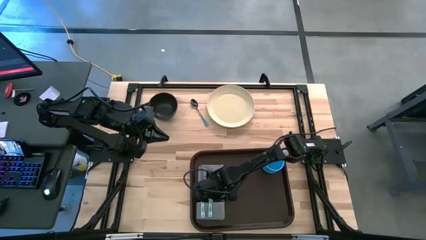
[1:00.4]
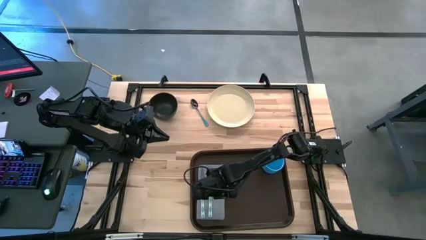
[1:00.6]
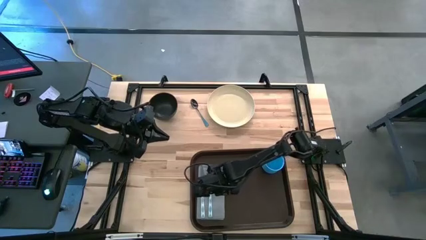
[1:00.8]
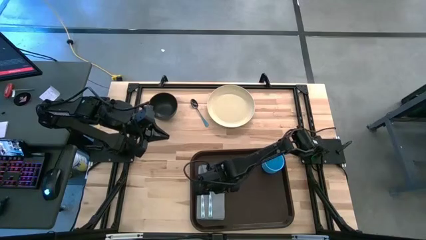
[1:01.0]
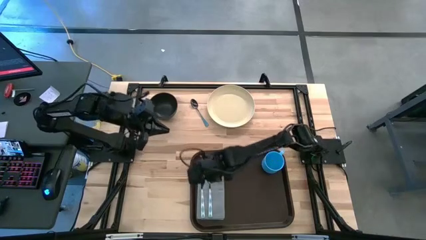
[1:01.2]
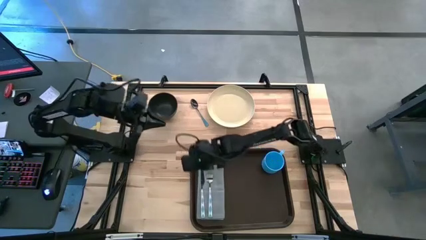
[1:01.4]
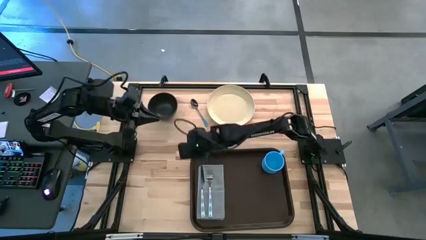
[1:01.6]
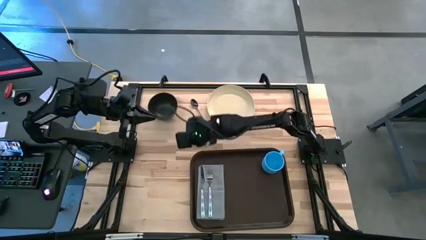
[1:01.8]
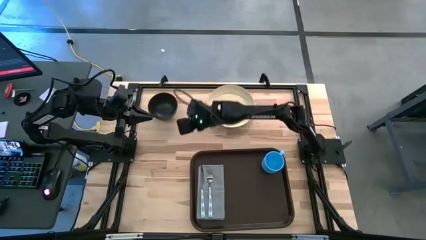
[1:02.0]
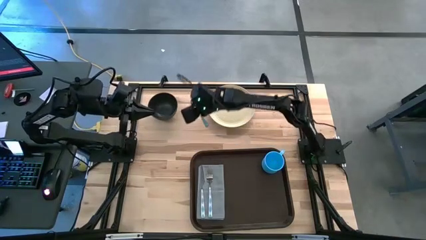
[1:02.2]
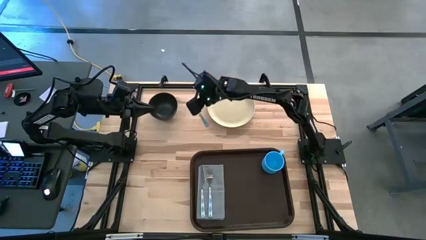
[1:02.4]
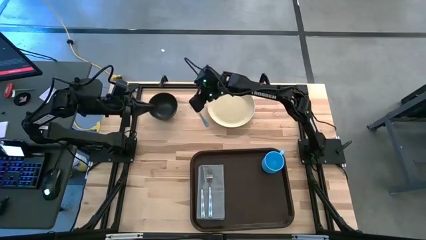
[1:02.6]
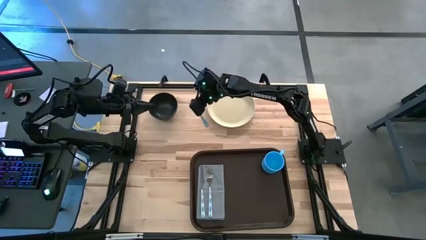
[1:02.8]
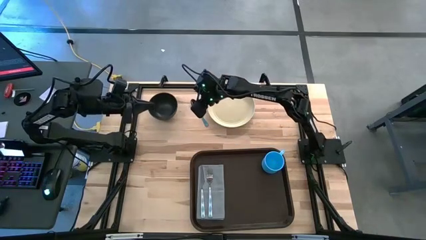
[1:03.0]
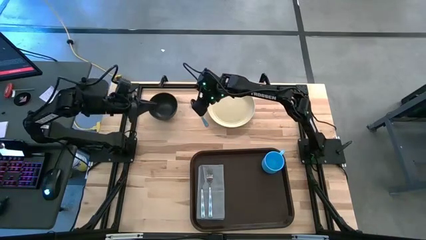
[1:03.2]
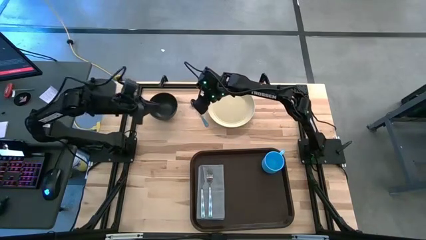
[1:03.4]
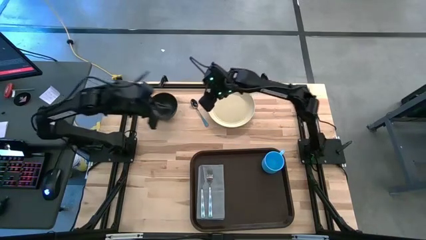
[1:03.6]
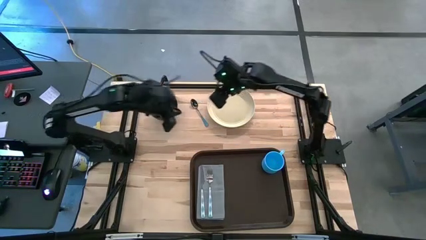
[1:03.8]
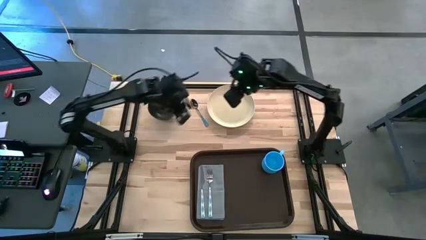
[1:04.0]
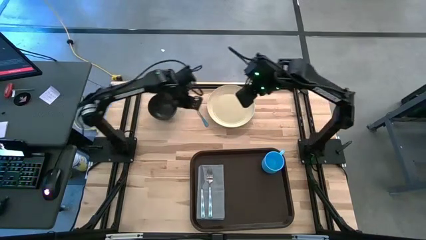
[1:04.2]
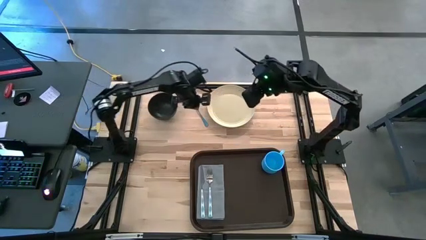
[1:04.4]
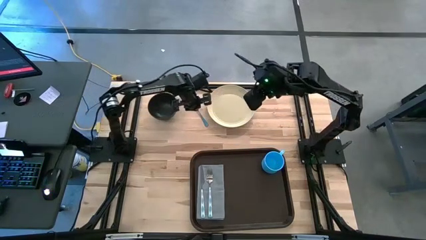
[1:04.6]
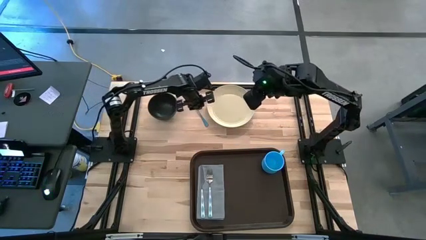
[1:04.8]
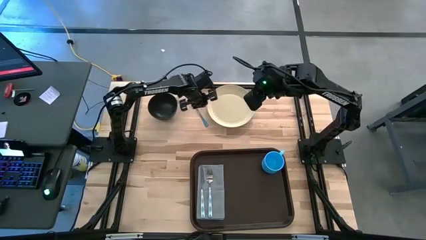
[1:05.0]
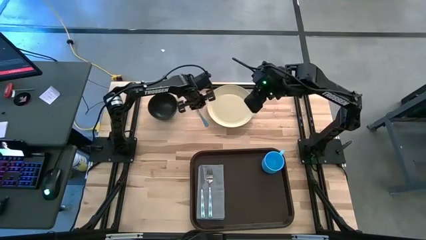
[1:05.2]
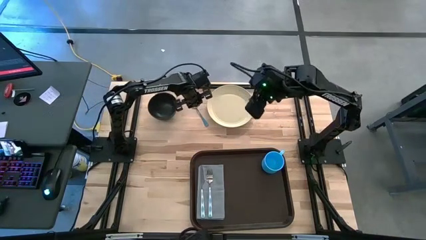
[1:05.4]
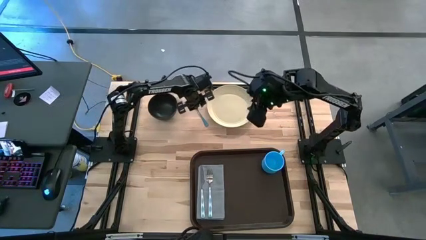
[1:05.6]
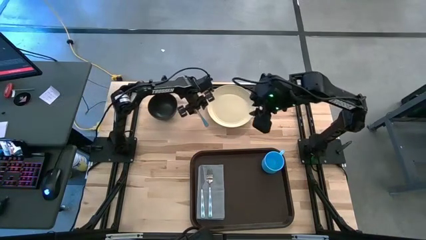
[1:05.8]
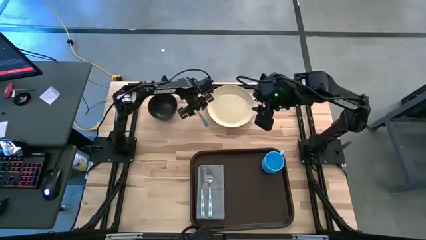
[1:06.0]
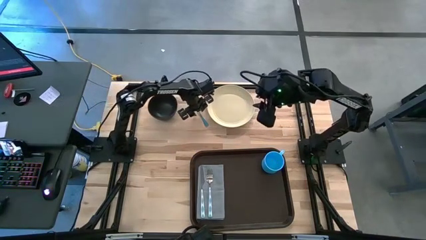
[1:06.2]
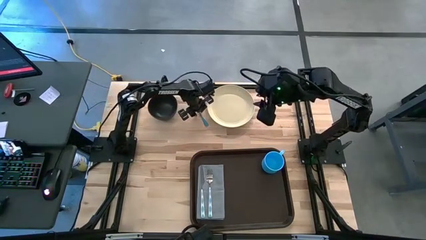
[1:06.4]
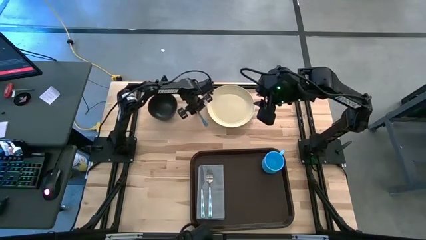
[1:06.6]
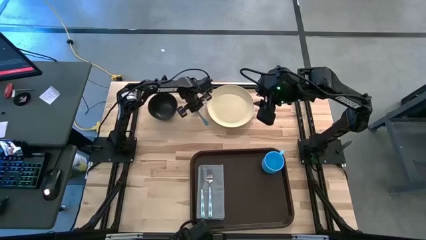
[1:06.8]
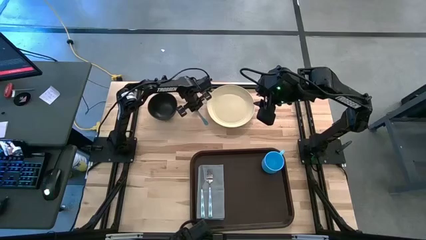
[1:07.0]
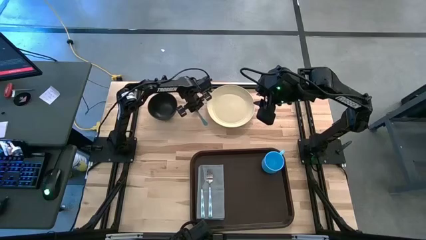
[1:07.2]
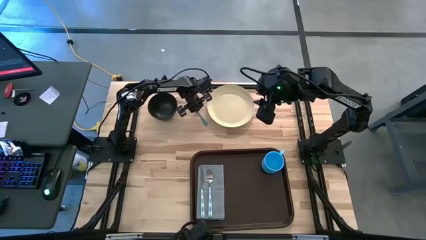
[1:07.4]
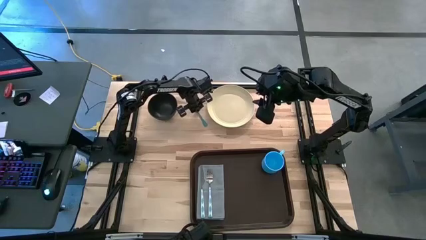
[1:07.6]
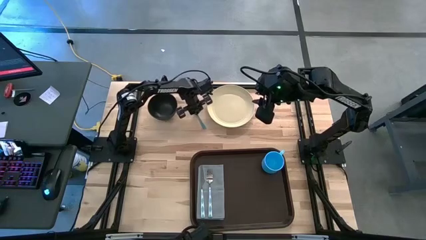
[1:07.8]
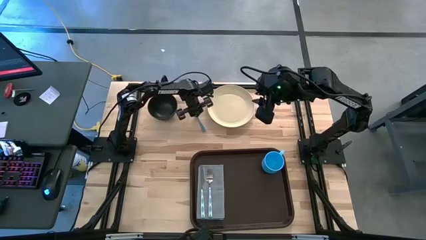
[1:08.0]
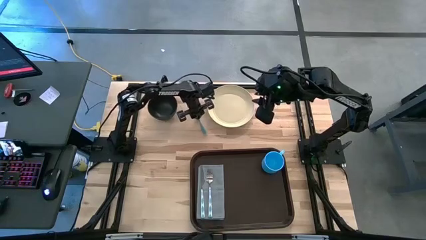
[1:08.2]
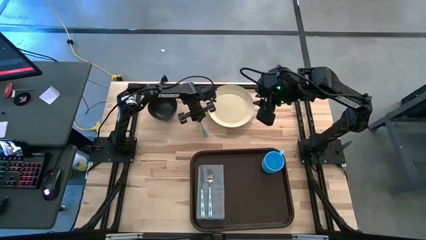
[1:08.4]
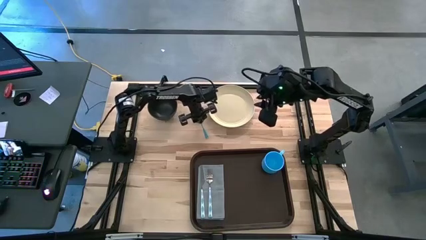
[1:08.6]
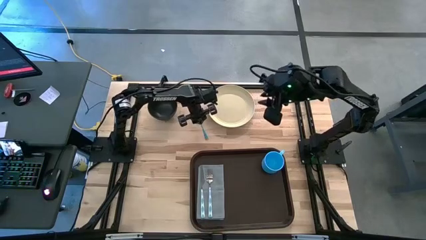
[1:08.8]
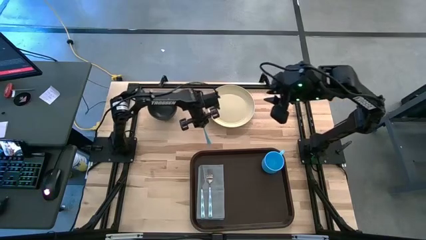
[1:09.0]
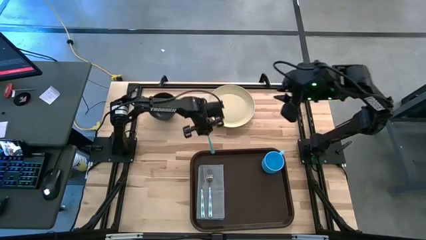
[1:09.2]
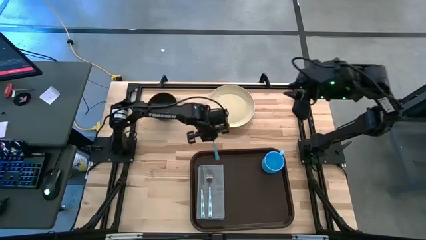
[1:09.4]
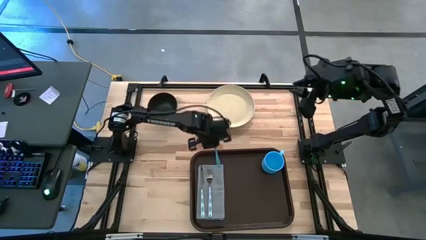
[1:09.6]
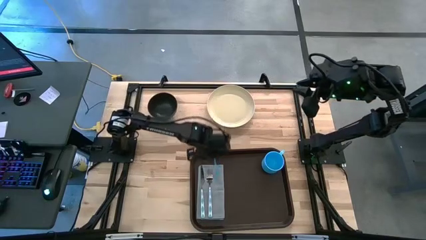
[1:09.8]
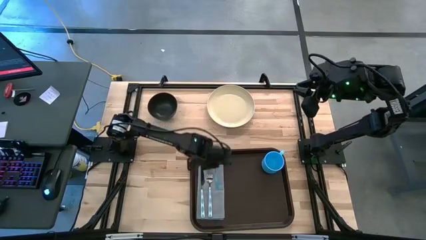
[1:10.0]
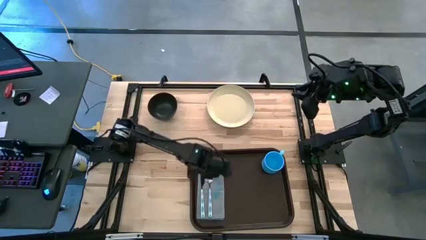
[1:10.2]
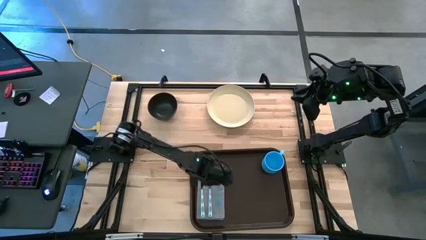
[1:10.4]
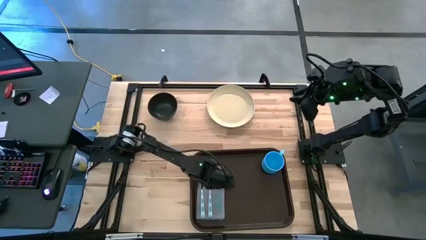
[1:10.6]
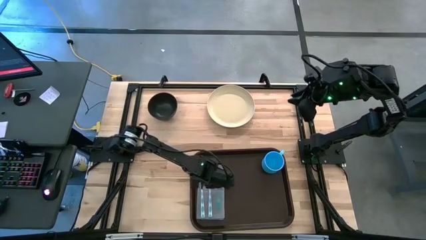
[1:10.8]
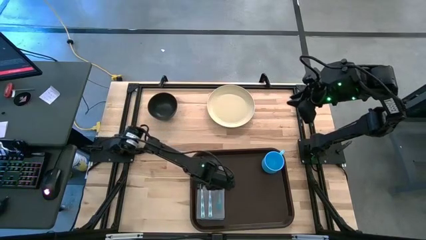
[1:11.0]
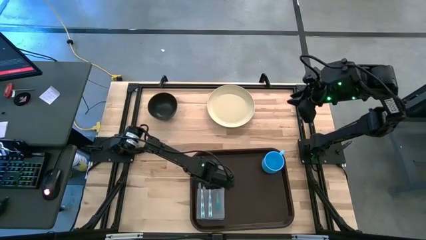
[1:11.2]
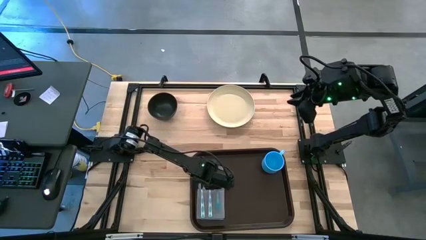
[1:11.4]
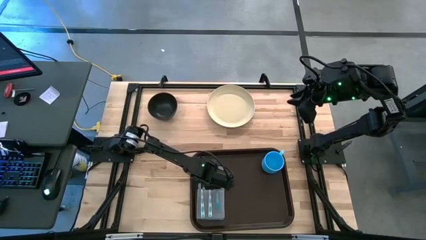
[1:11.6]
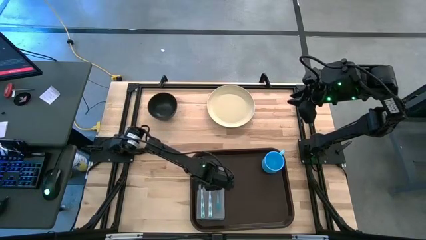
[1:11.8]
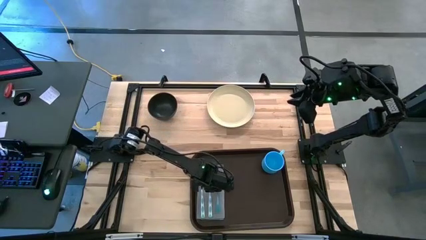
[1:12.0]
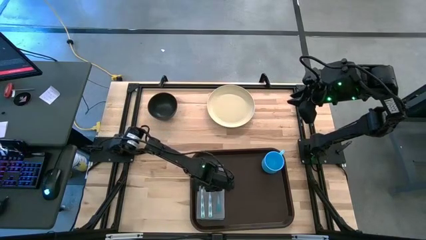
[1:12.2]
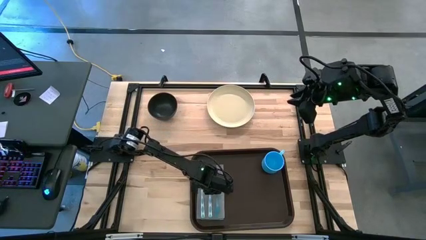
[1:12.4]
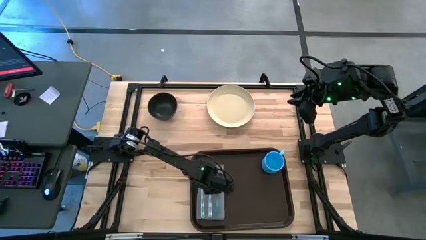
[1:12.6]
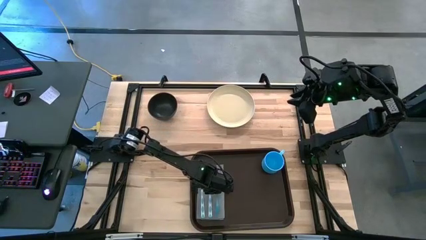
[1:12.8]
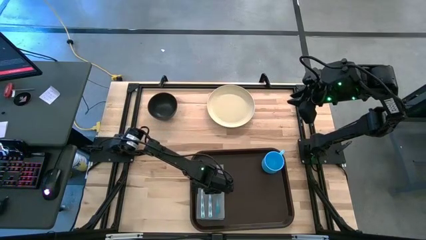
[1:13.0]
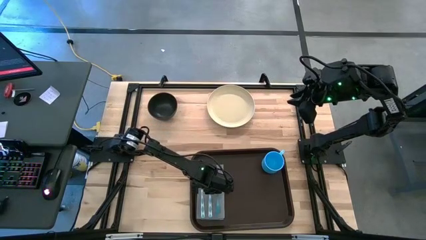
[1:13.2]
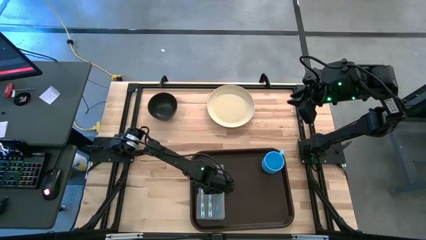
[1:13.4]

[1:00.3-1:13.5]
Task: Set up tray
Put the blue spoon on the gray table napkin to the right side of the white fork
